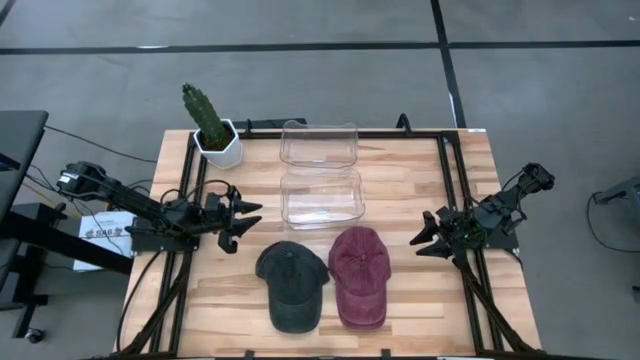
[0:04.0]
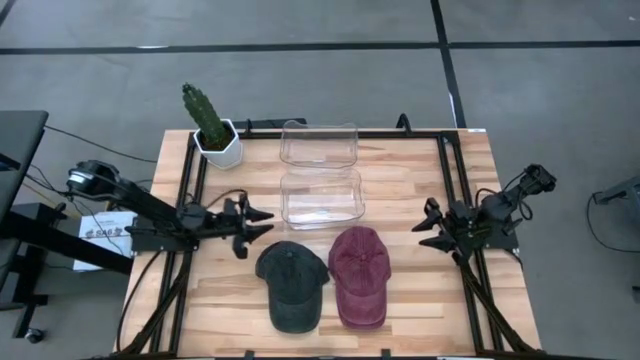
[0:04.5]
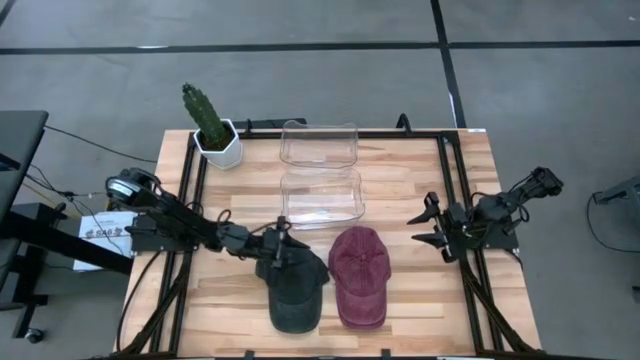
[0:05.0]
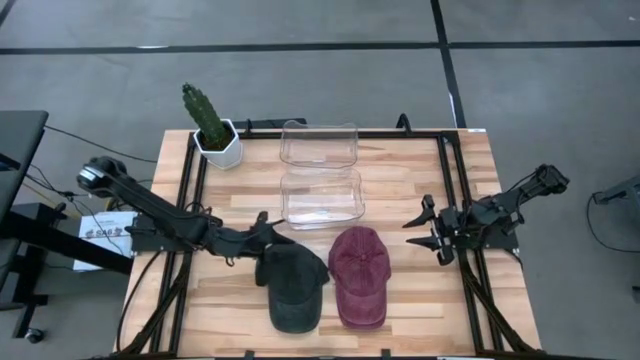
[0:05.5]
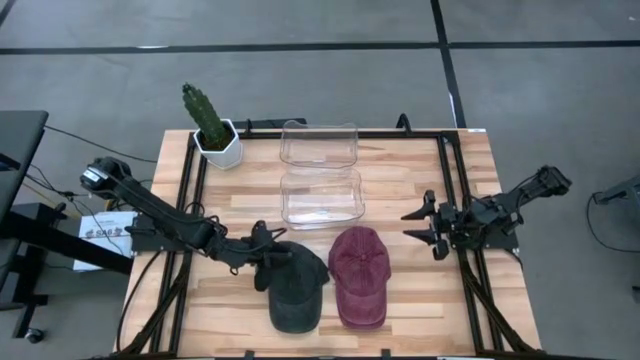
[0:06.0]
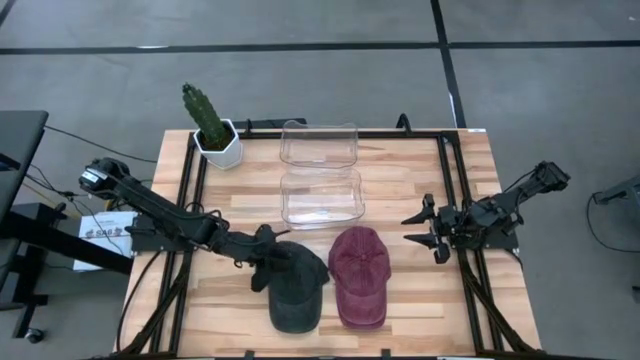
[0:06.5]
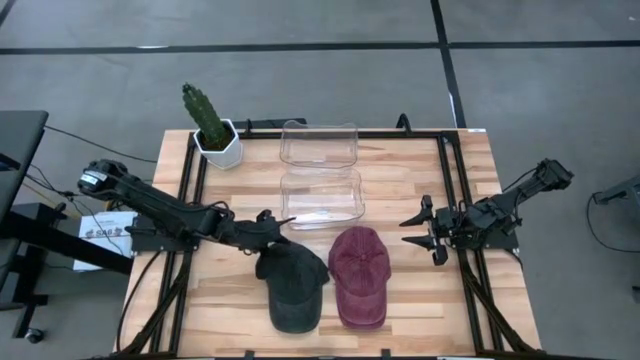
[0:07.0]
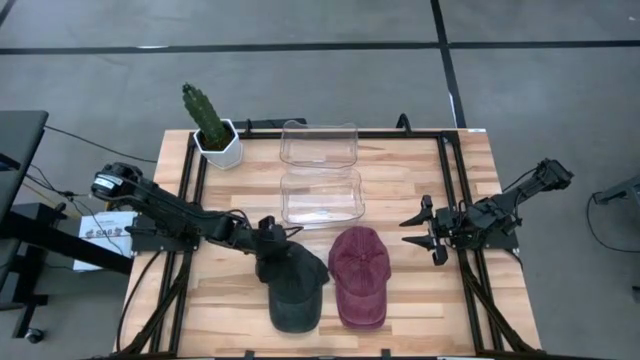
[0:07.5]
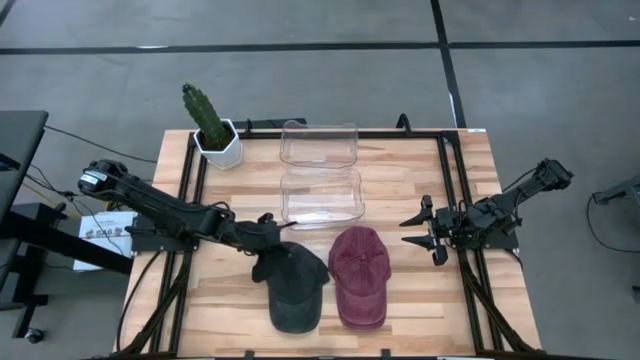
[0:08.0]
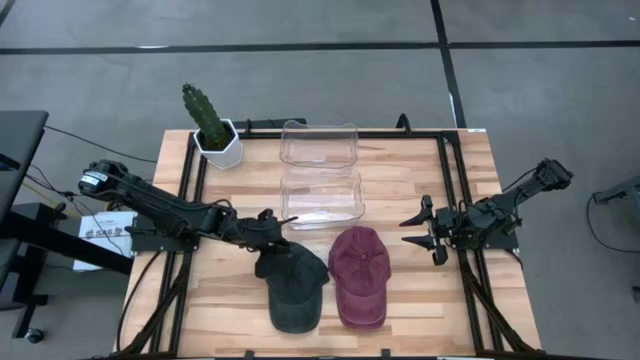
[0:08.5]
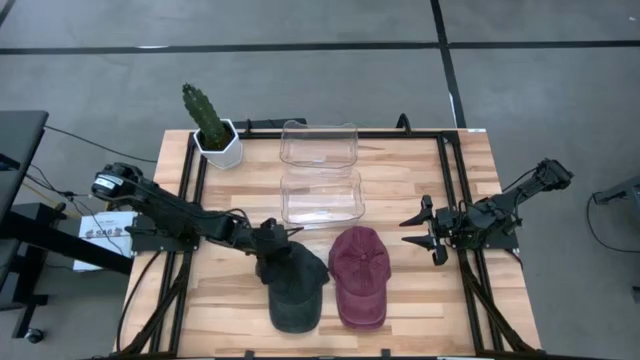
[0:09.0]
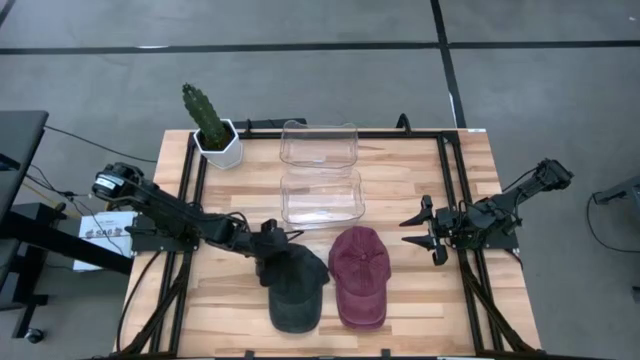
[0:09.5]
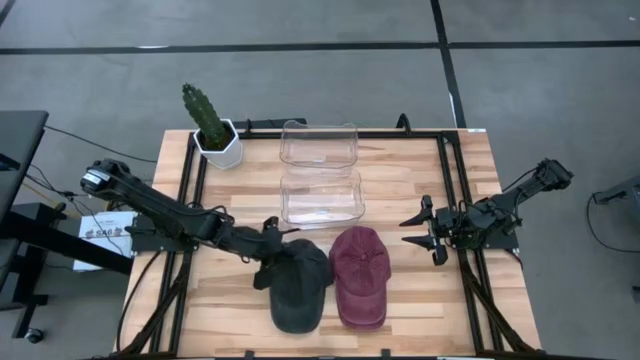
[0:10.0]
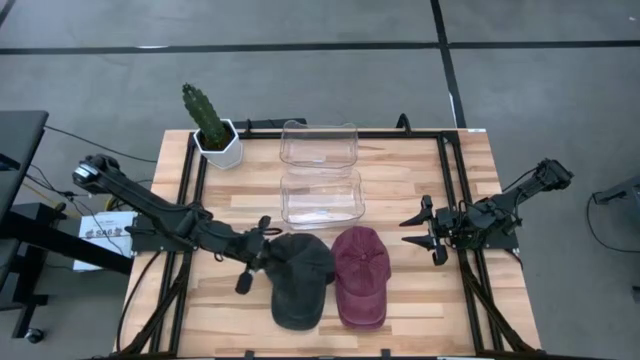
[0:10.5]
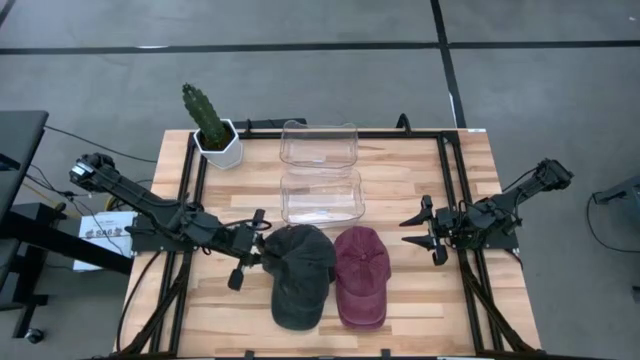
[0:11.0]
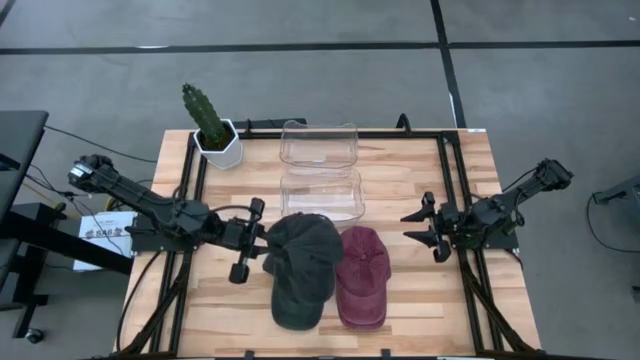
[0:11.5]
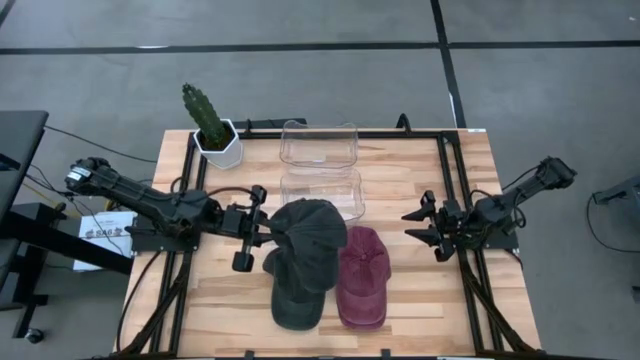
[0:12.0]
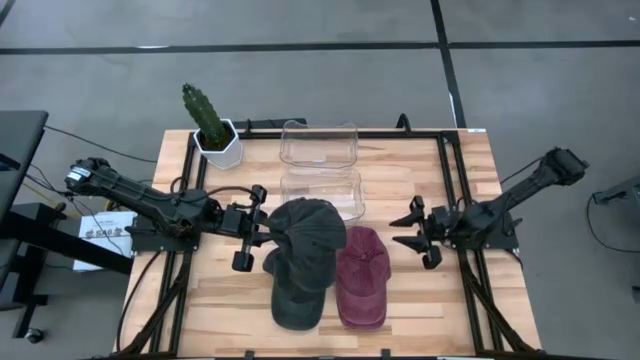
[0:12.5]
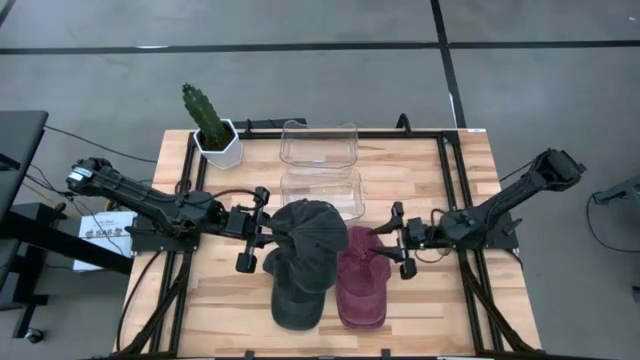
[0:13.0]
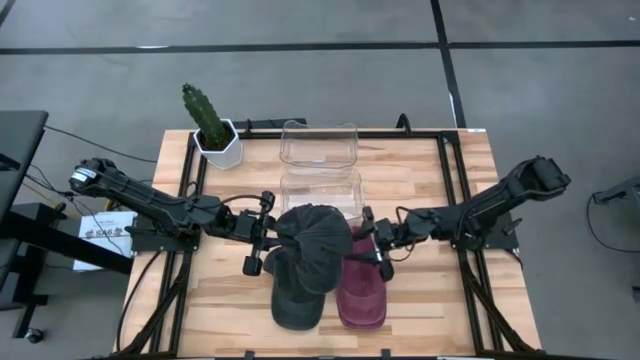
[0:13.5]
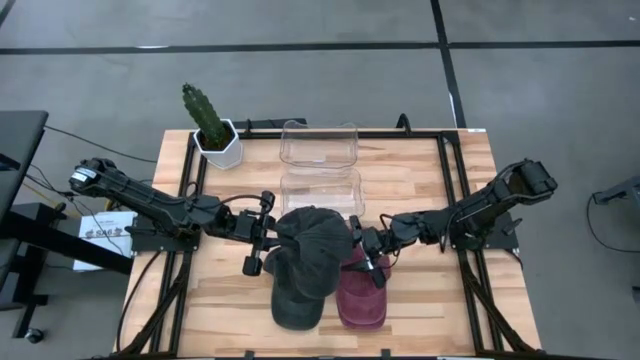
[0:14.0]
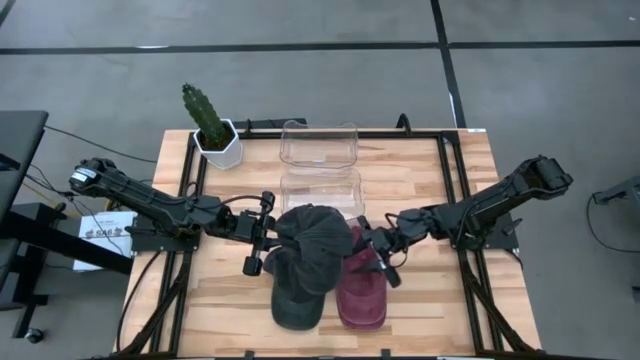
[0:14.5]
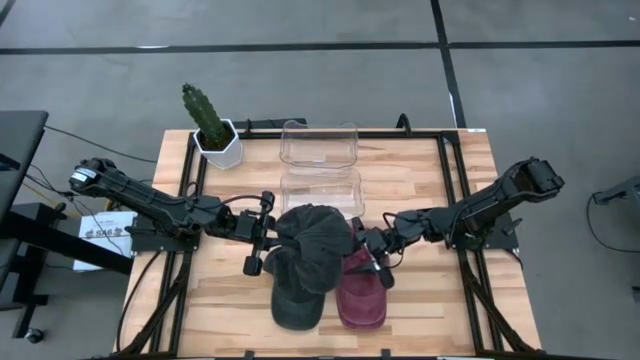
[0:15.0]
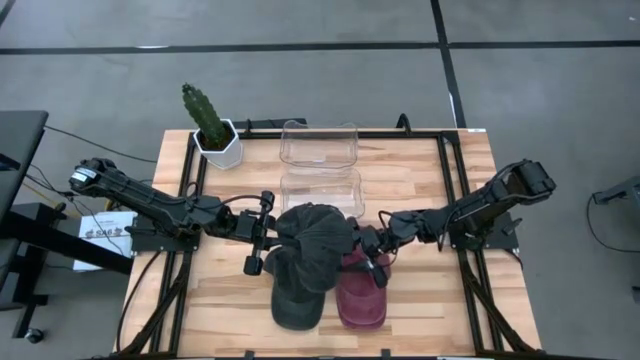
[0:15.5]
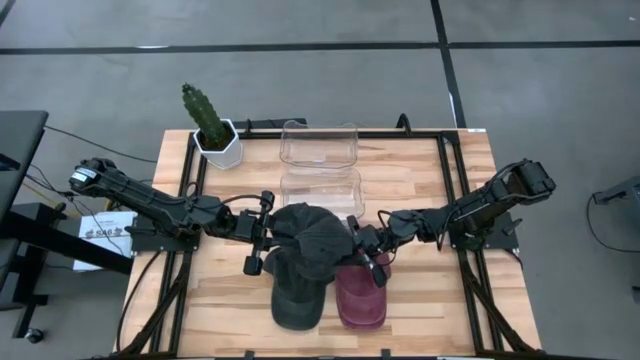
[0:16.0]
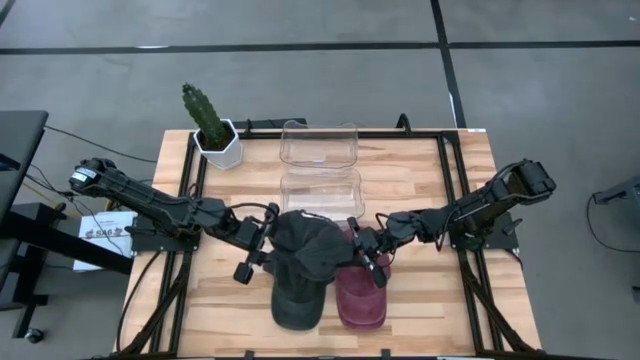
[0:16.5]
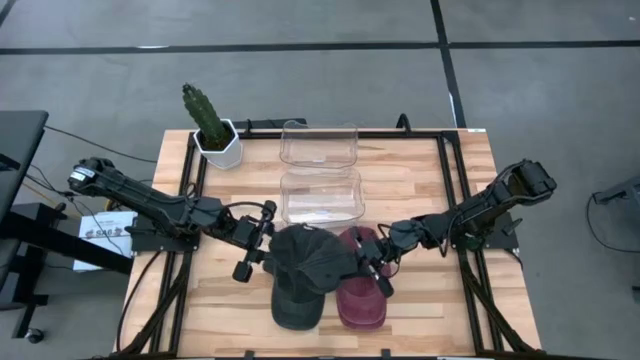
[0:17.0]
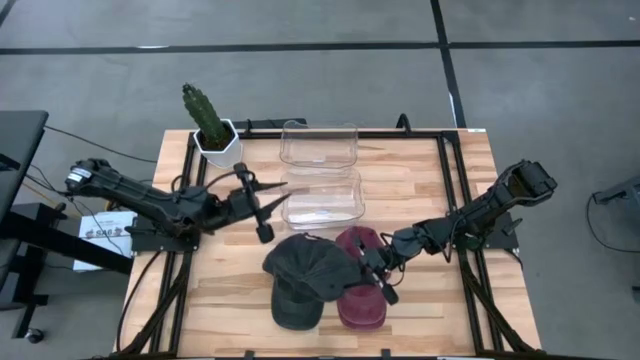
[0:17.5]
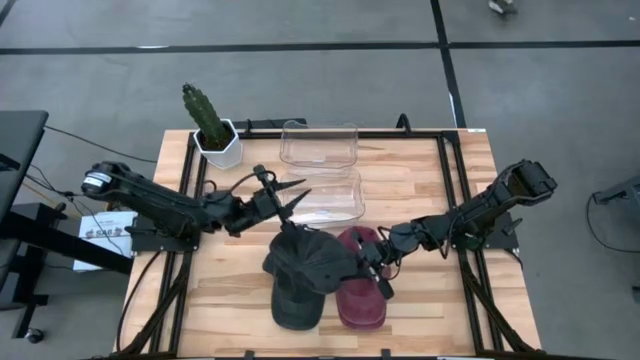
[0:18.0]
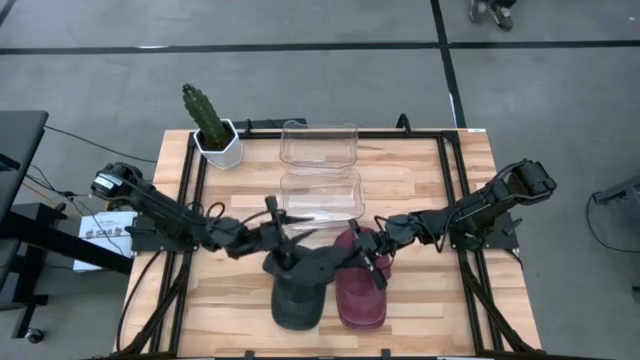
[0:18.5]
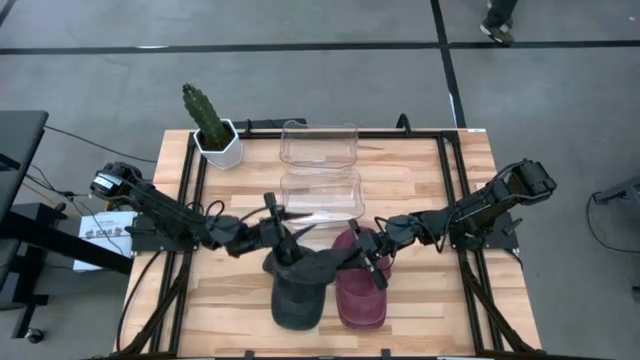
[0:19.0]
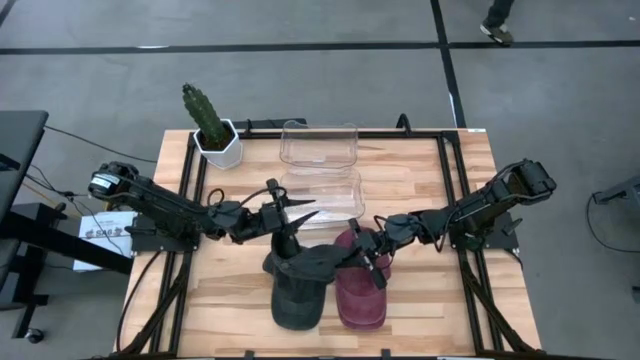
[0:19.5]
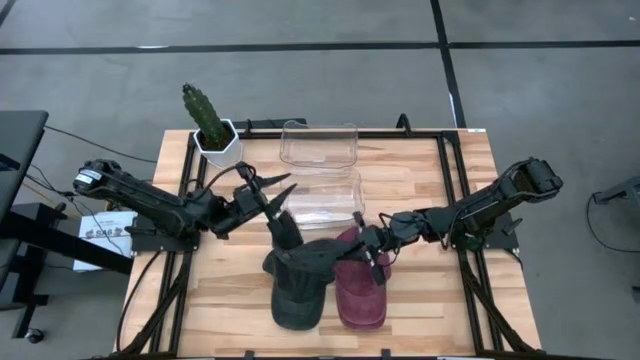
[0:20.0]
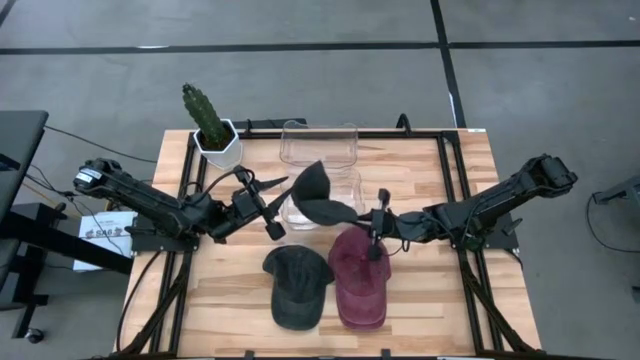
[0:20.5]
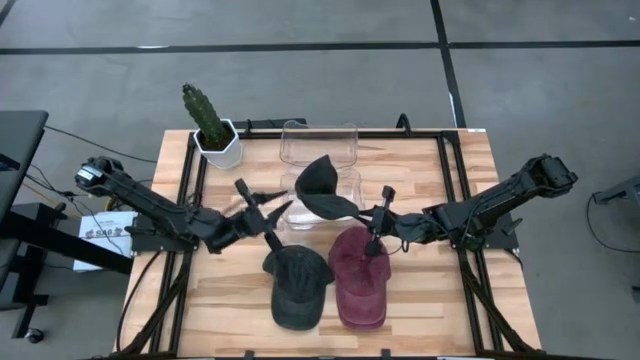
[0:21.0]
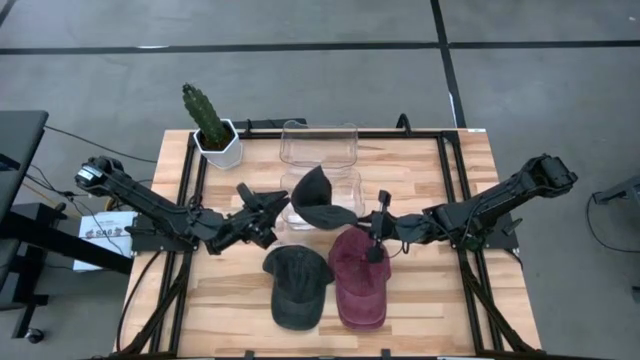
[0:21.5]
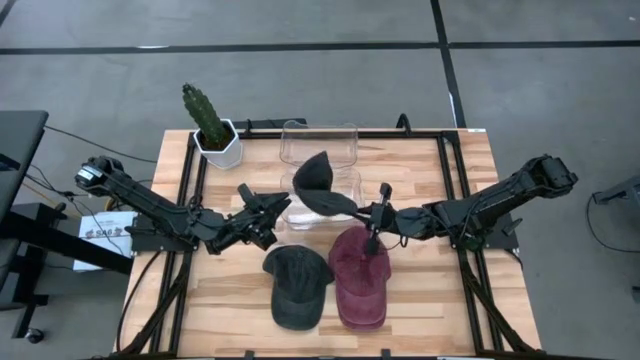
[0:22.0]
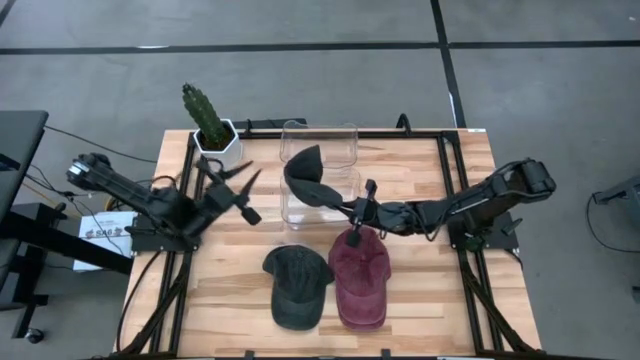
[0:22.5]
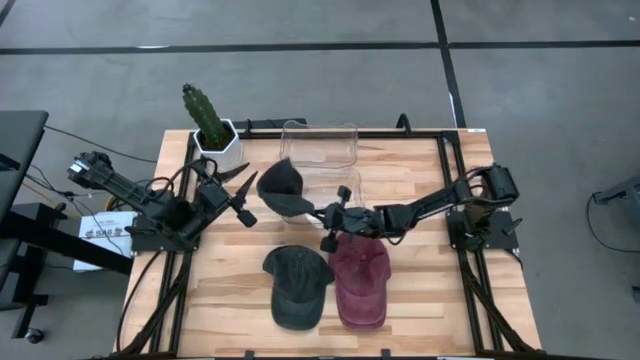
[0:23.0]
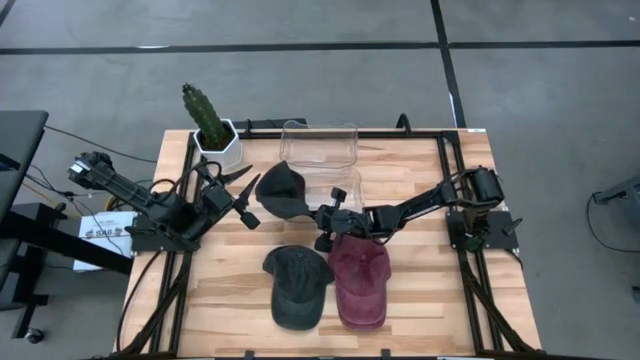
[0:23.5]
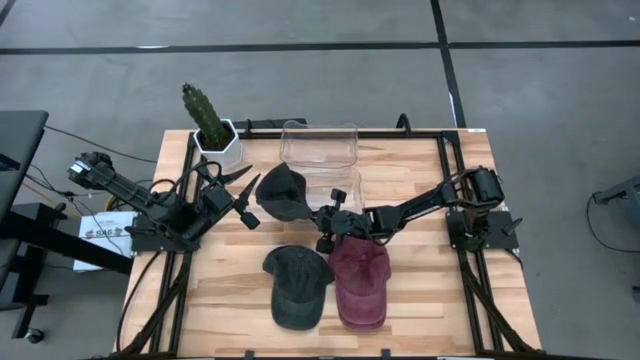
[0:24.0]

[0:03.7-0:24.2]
Task: Pick & Place hat
Put the top black cap into the bottom transparent bin
